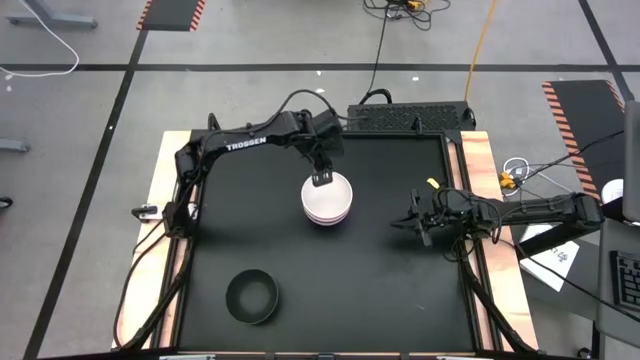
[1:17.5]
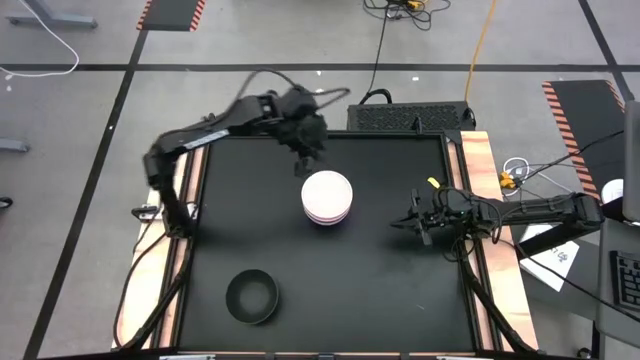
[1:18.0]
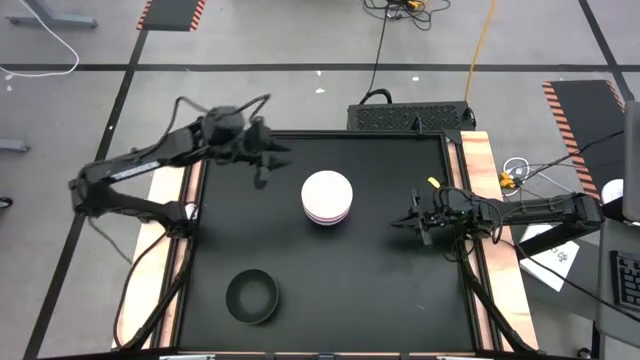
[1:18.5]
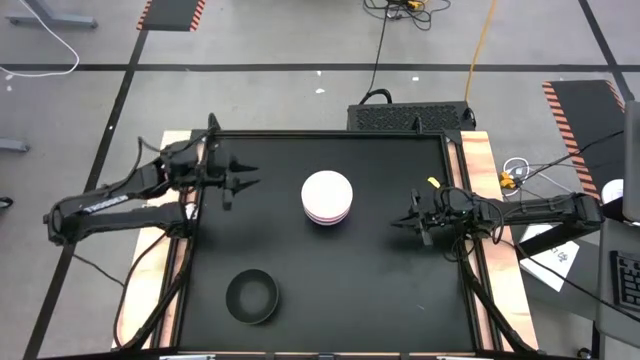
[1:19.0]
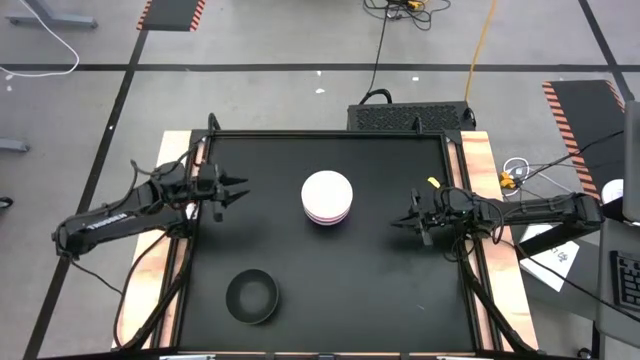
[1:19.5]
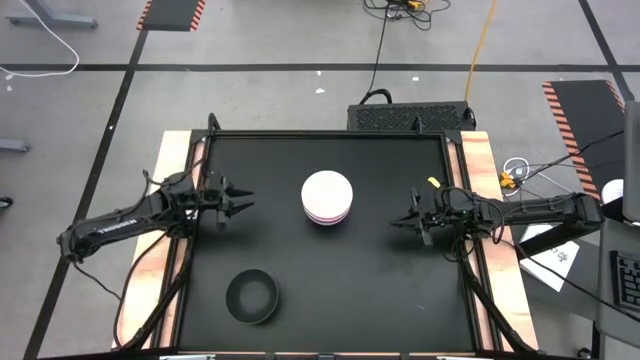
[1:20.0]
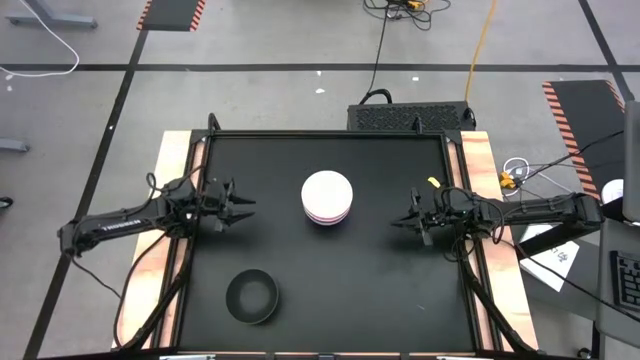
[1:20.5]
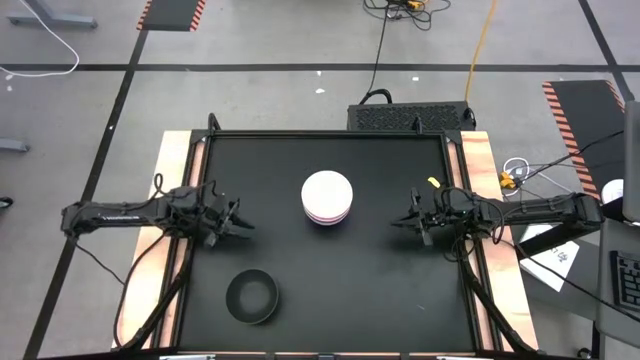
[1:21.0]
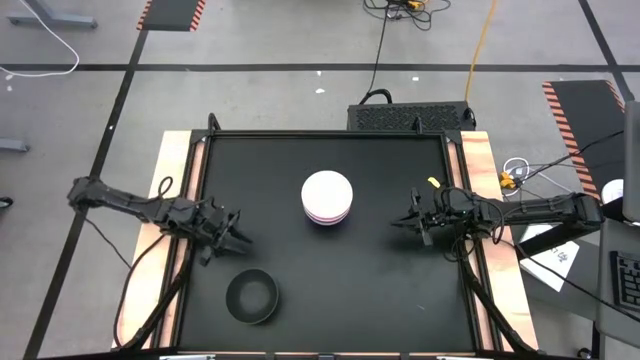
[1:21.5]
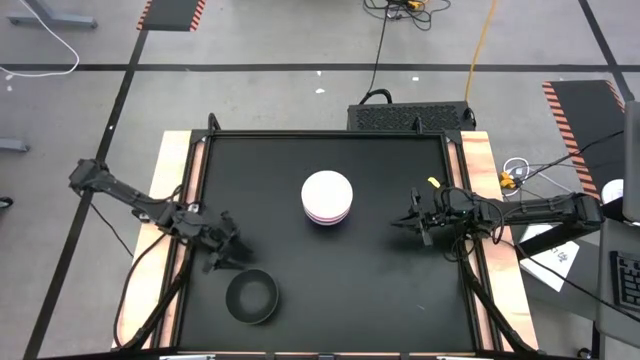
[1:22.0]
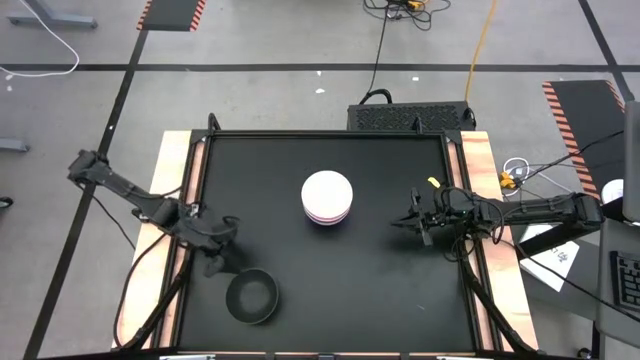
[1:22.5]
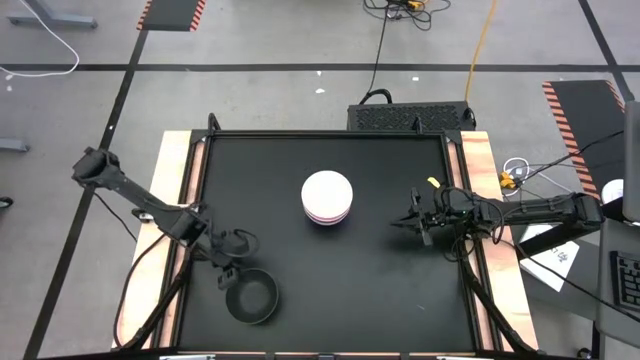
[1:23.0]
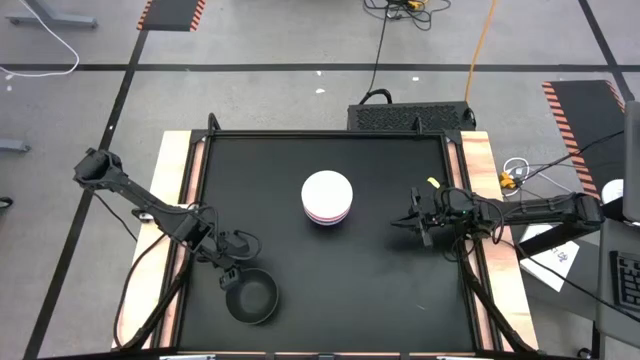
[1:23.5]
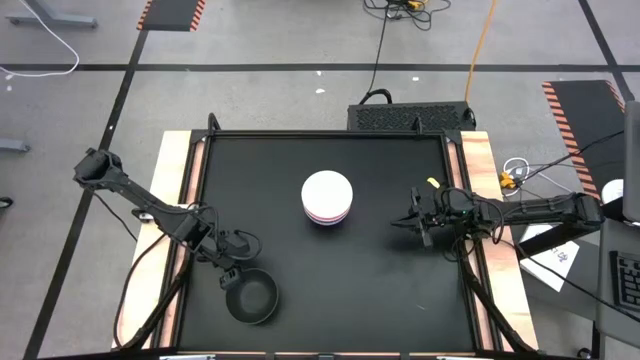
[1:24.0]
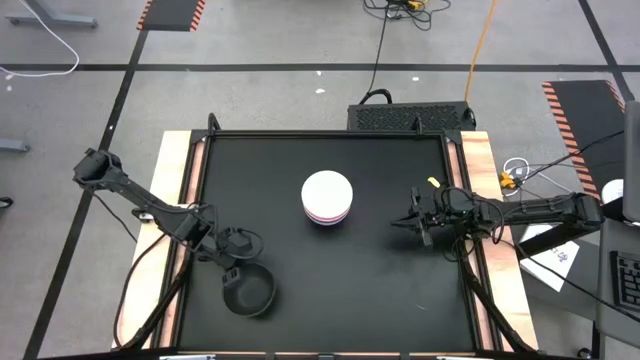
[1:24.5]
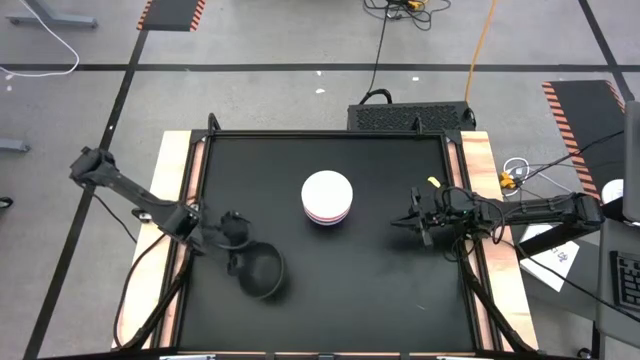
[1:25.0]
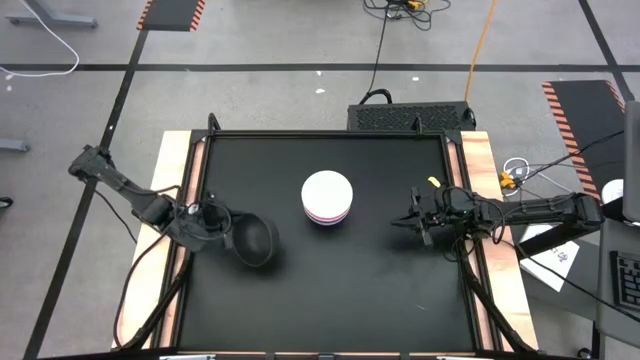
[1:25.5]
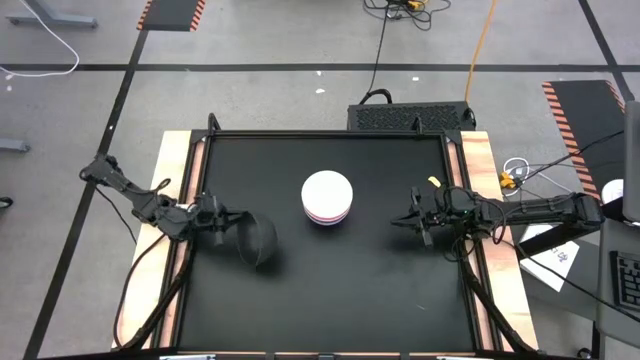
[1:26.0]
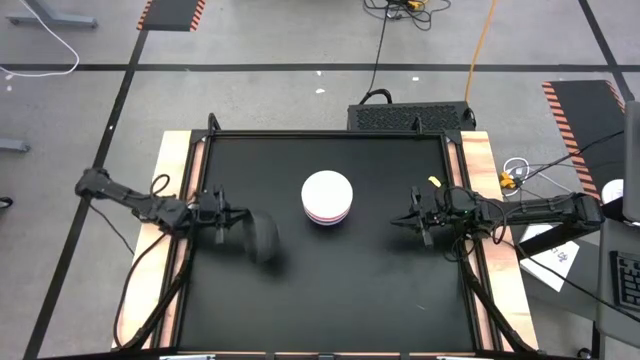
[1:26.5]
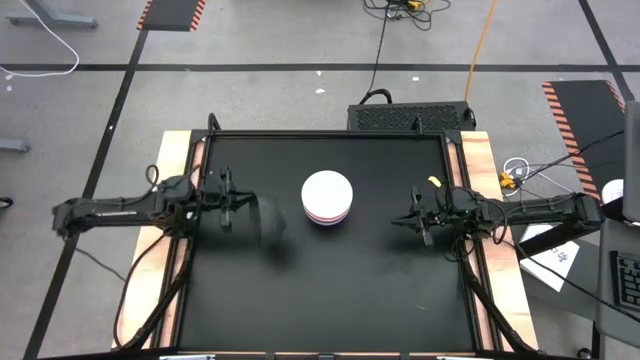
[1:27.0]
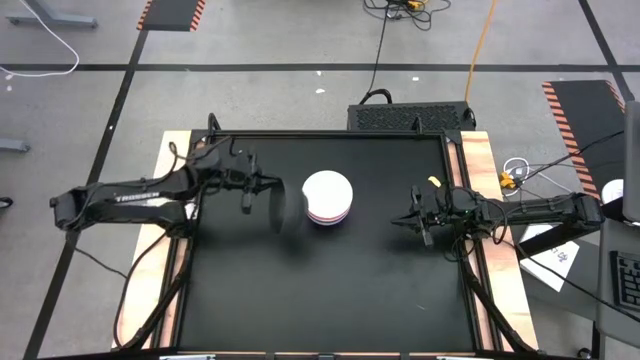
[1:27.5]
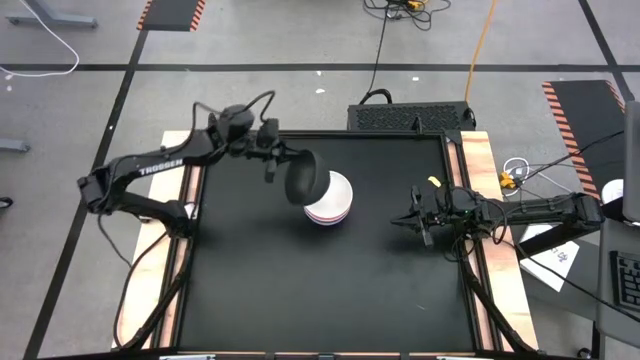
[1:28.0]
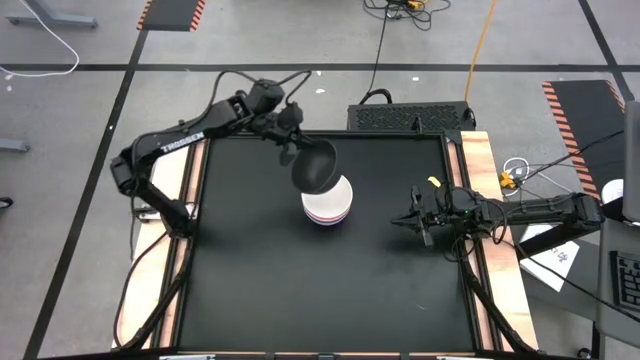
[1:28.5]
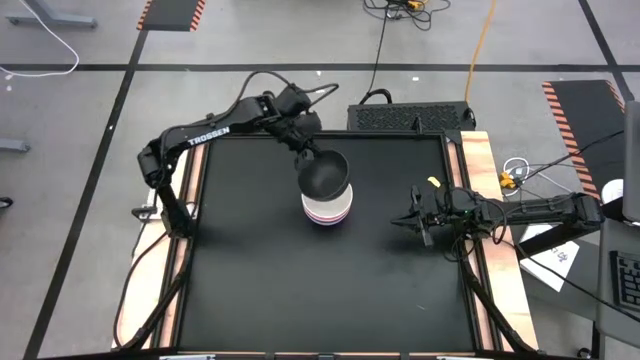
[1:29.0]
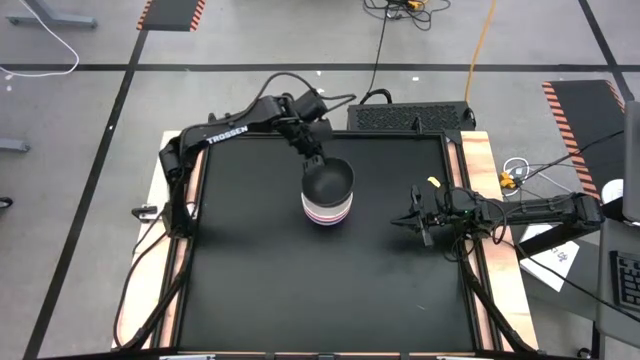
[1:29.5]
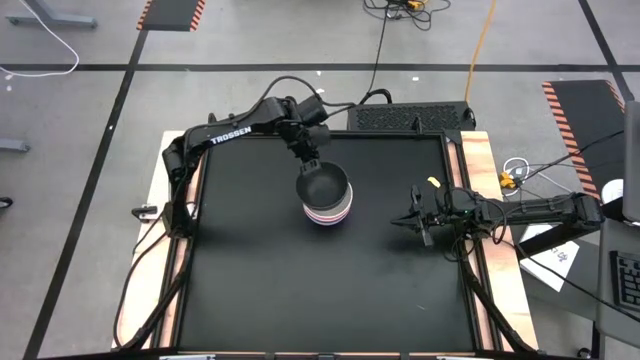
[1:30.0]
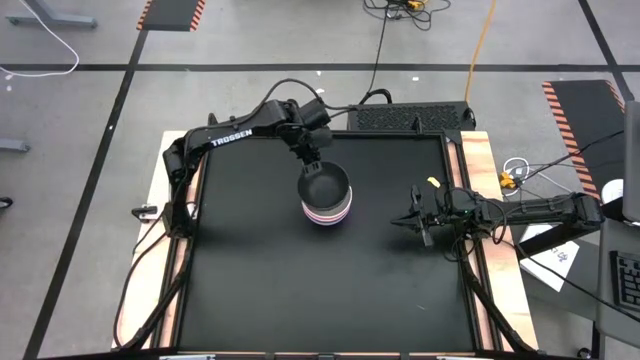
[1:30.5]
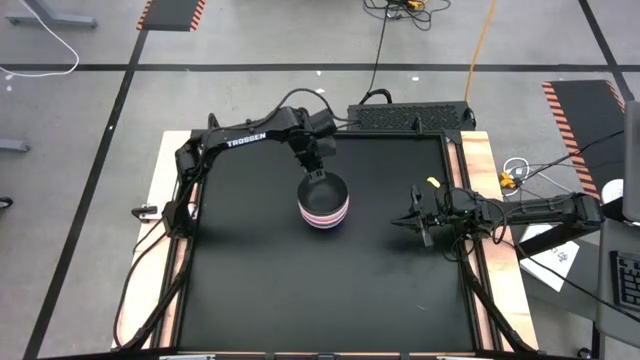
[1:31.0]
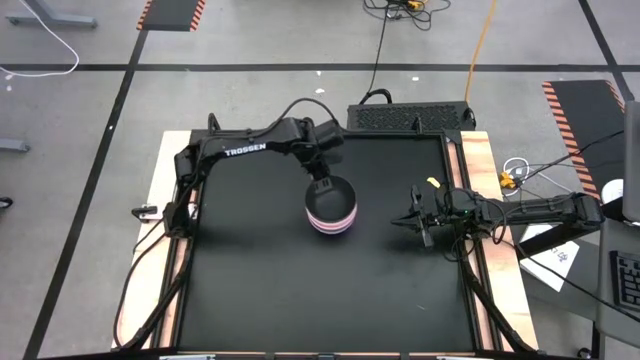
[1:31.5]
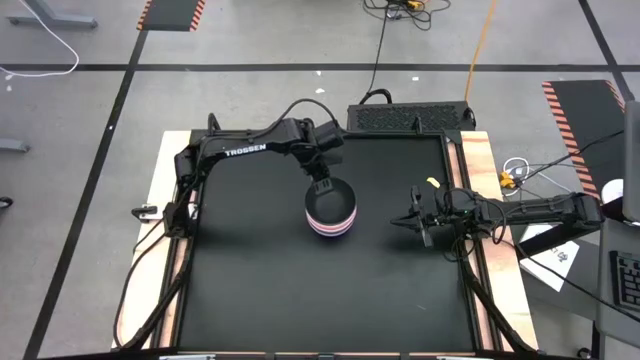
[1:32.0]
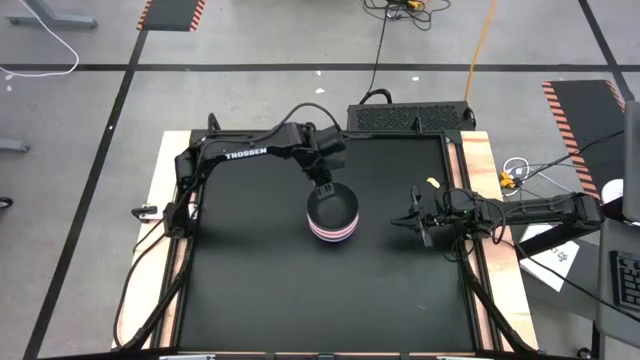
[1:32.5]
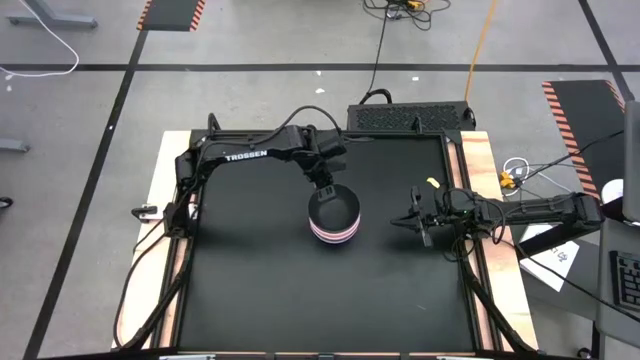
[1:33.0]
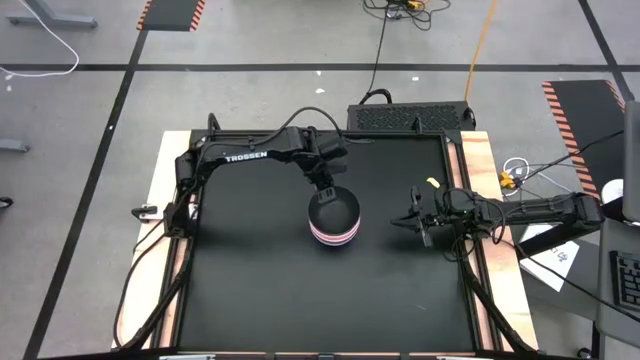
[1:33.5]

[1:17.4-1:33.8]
Task: Nest bowls inside each other
Stack the black bowl on top of the white bowl

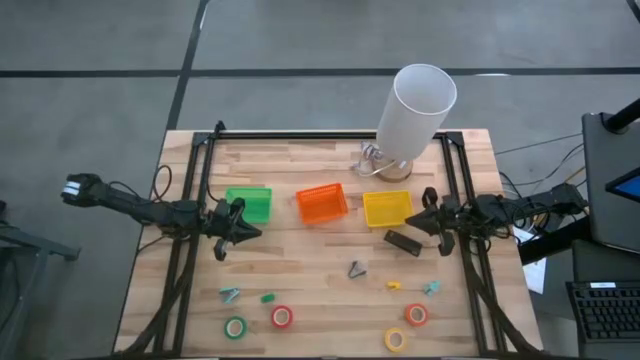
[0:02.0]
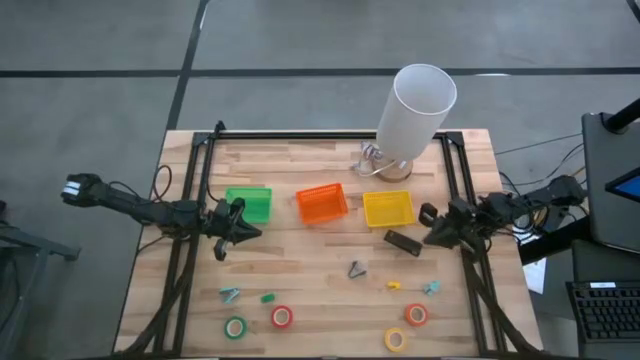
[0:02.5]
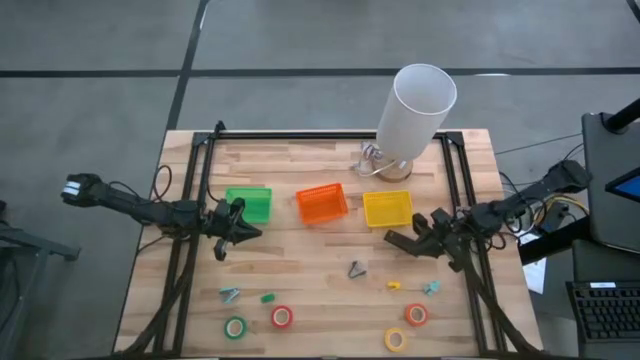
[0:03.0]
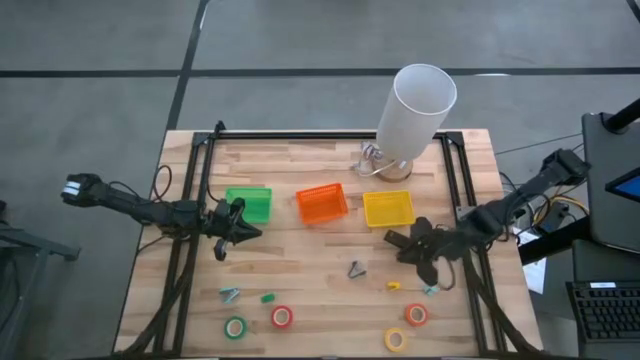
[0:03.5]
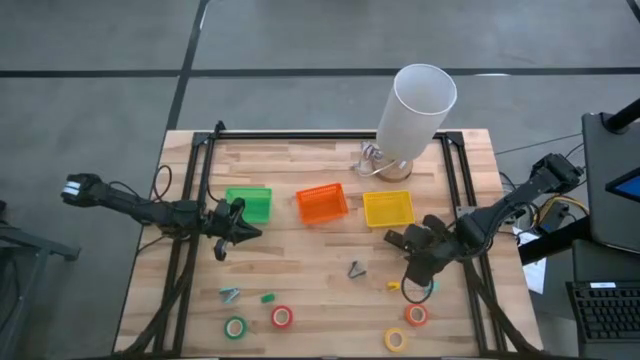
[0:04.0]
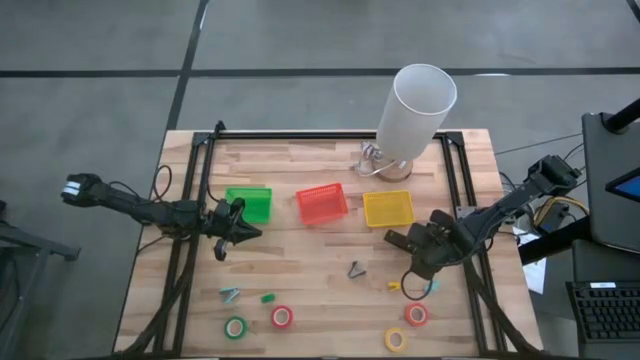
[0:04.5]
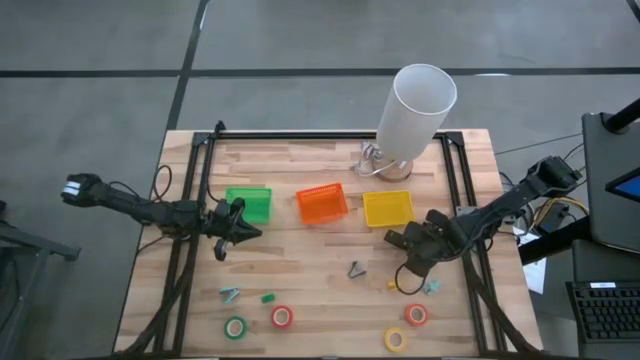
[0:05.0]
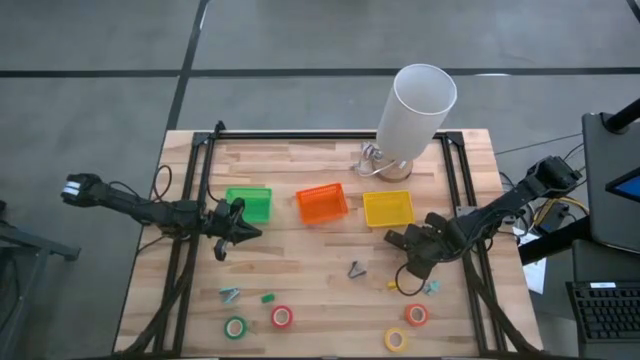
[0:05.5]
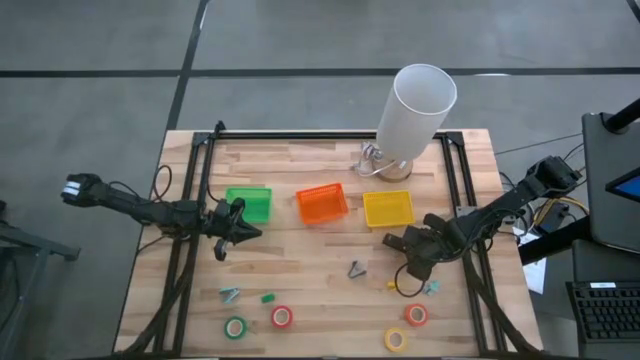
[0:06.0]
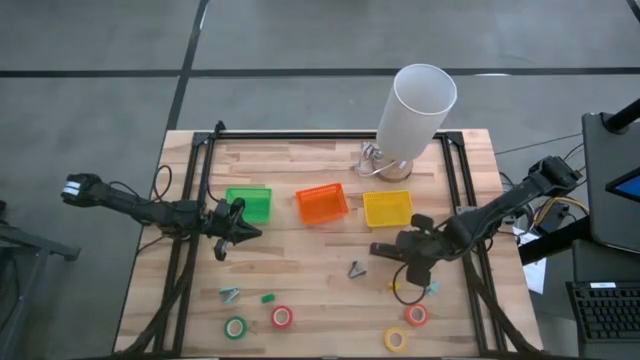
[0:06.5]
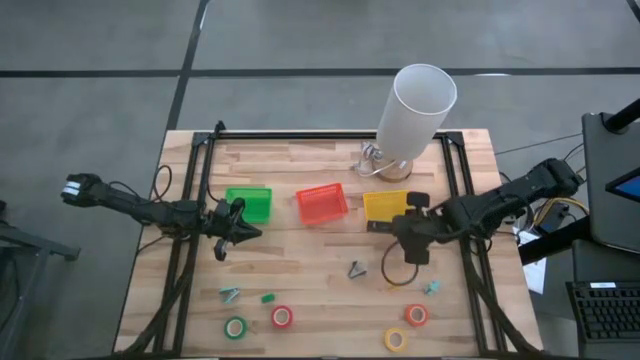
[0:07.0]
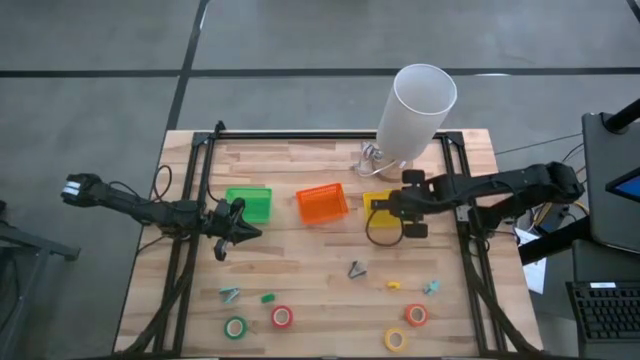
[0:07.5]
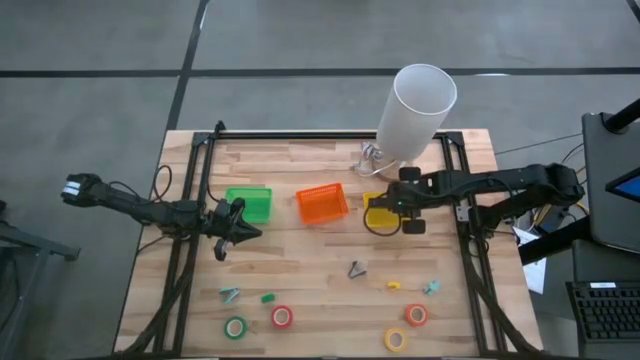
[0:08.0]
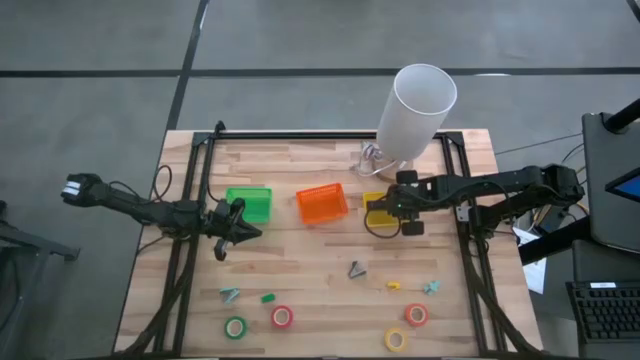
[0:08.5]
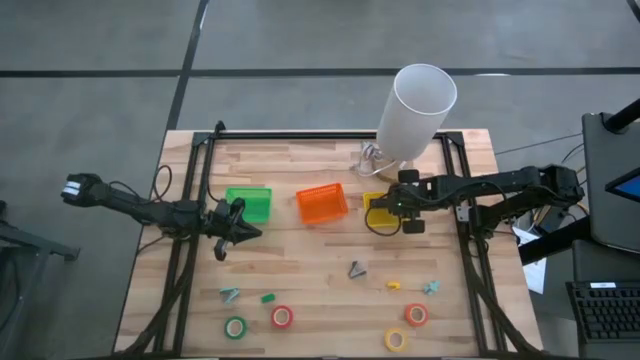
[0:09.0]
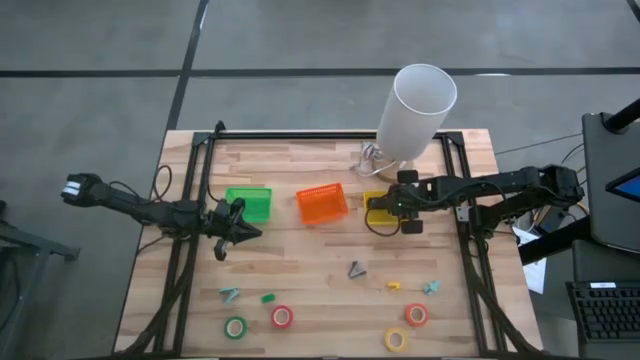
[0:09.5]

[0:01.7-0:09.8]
Task: Pick and place Stapler, Stapler remover, tape
Put the black stapler into the yellow basket
